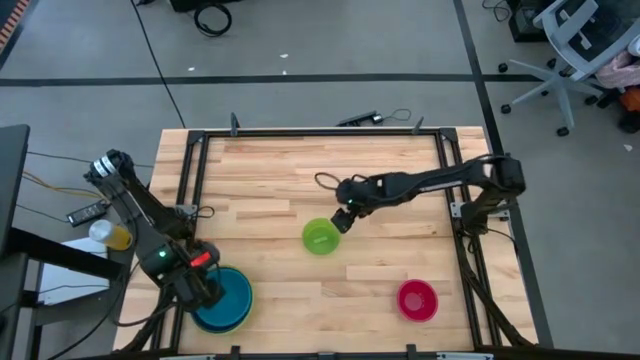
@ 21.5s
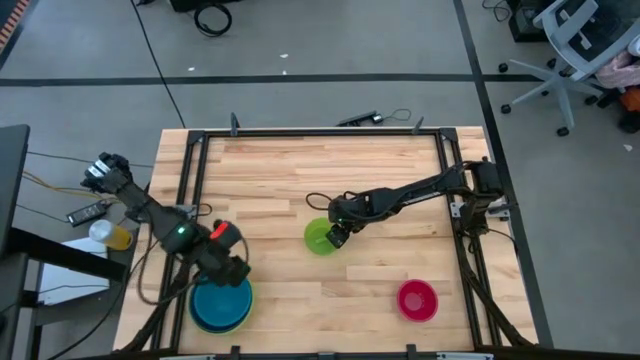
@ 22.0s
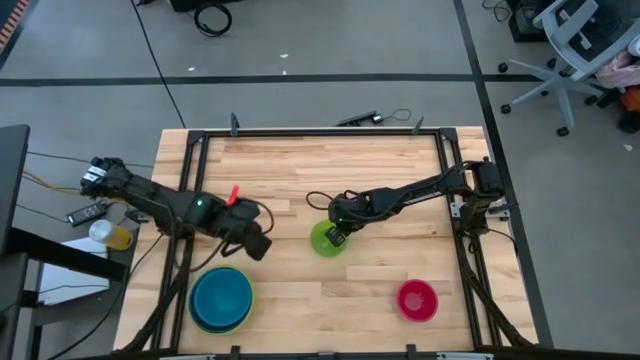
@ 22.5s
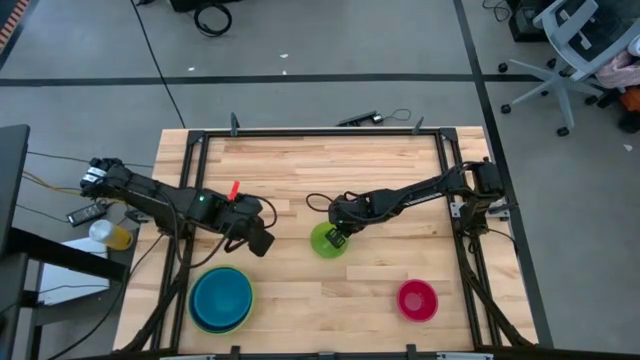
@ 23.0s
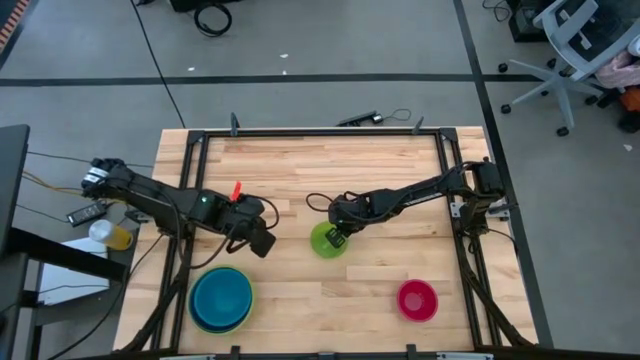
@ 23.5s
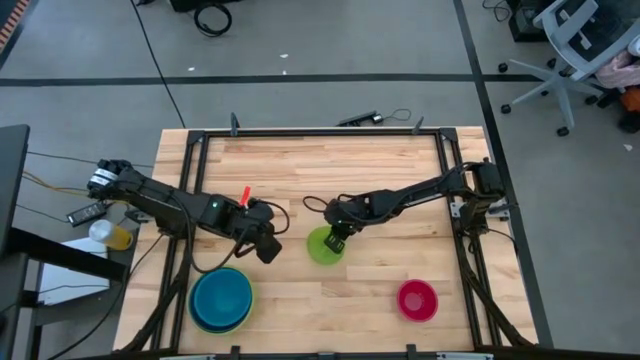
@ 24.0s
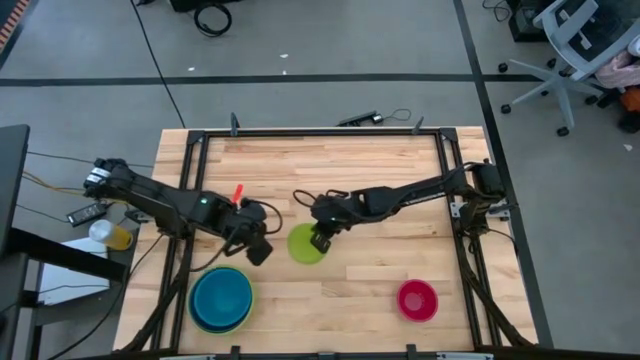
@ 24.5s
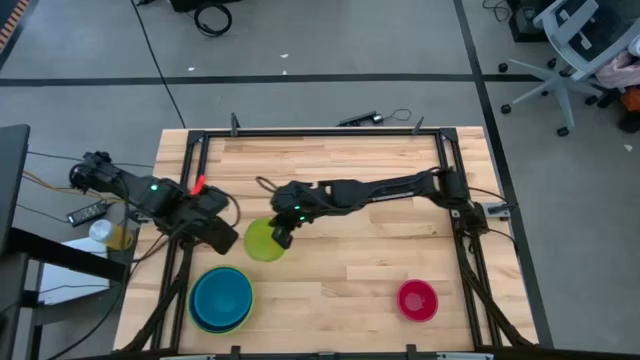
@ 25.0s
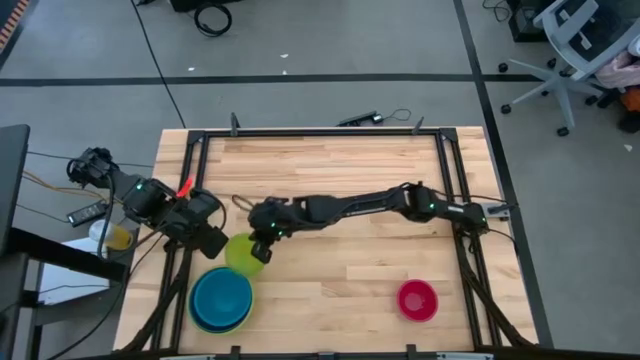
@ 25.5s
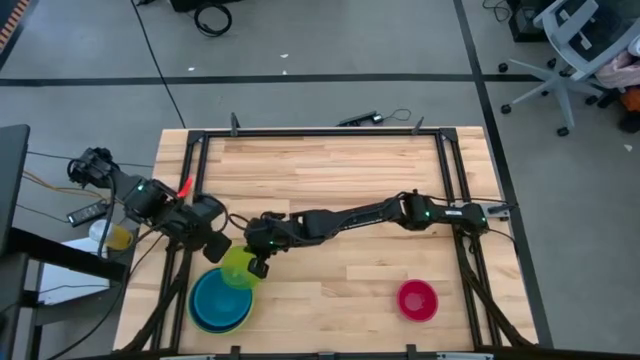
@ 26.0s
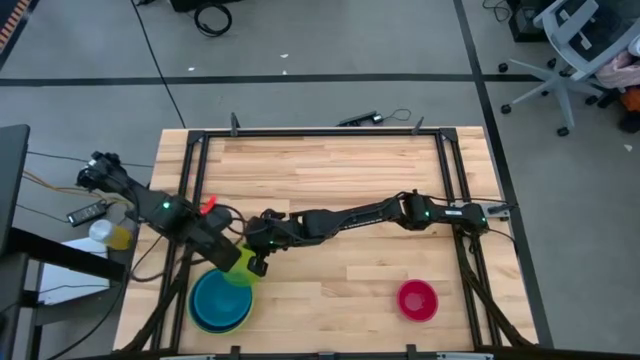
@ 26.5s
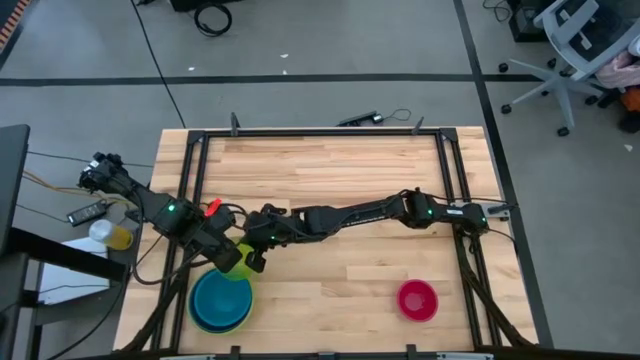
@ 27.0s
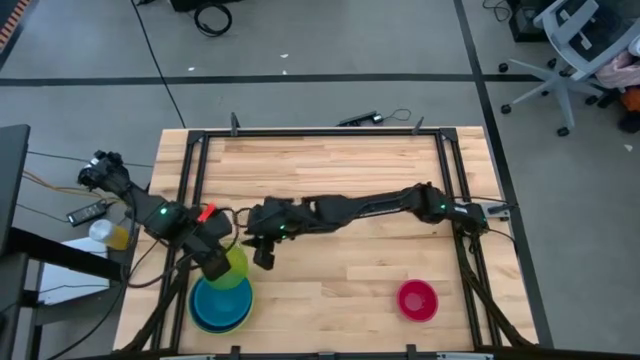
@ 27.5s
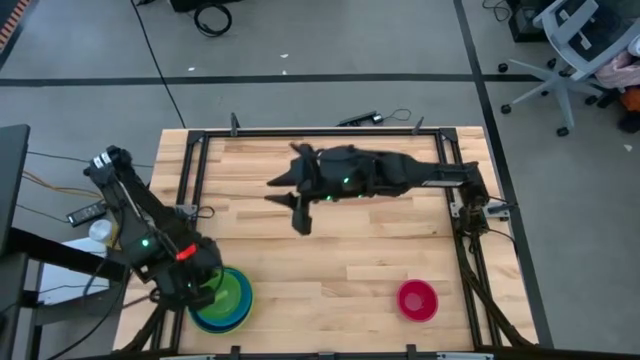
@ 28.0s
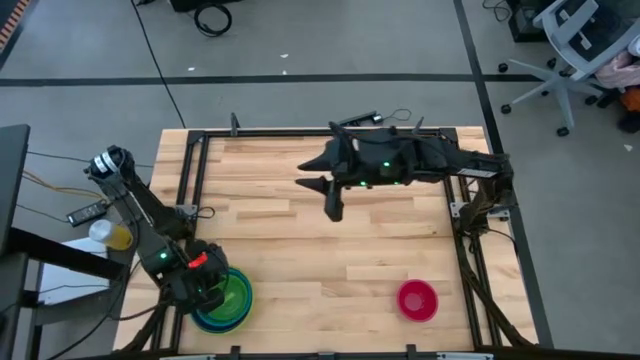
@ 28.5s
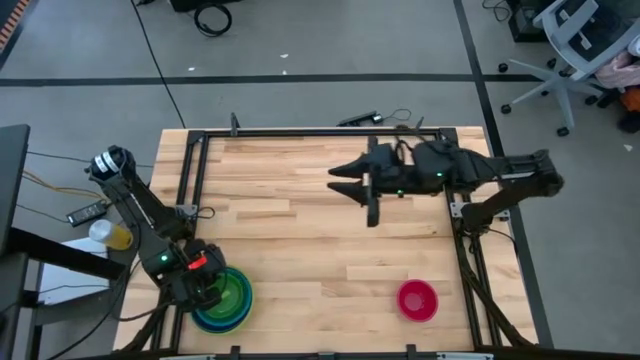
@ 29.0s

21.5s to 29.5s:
Stack the light green bowl on top of the blue bowl

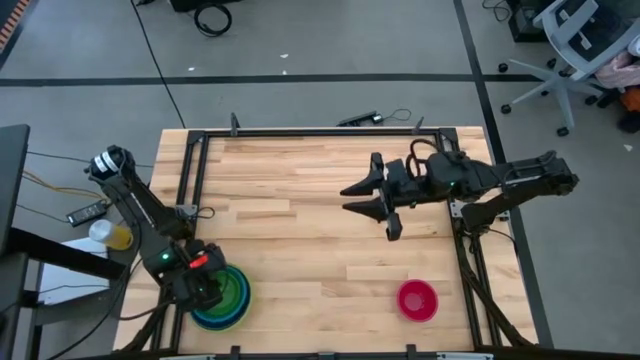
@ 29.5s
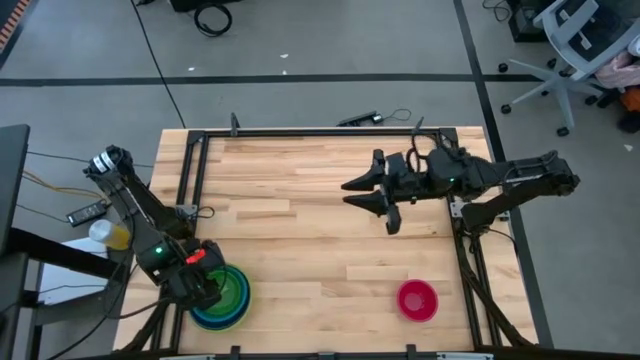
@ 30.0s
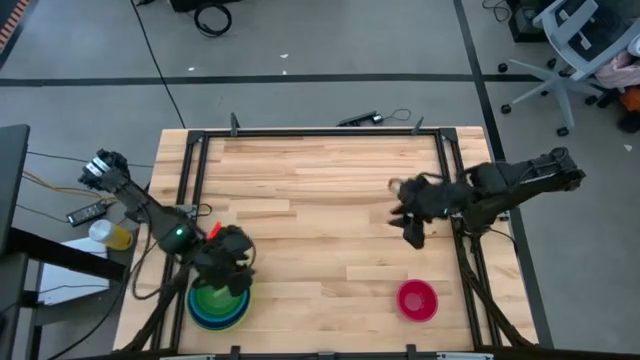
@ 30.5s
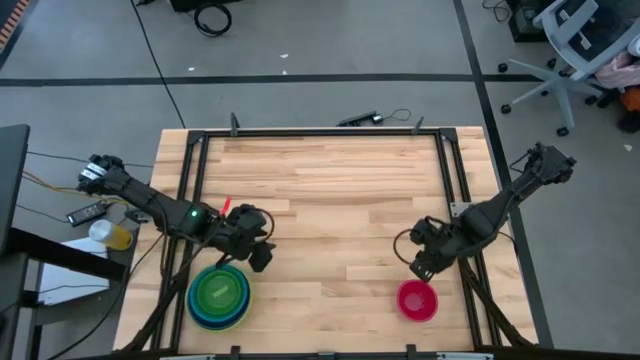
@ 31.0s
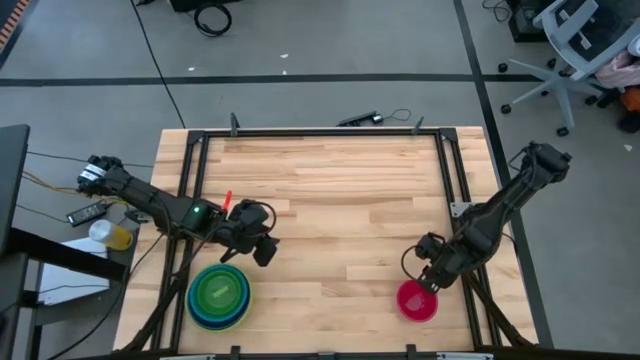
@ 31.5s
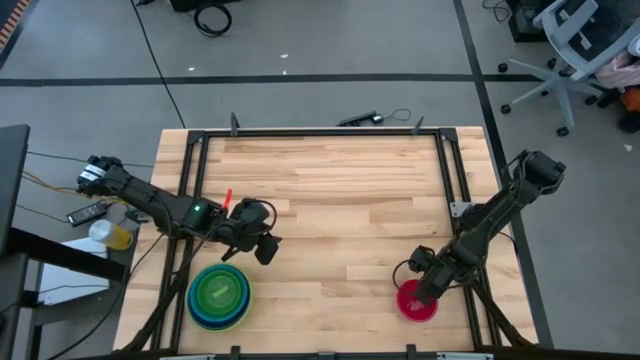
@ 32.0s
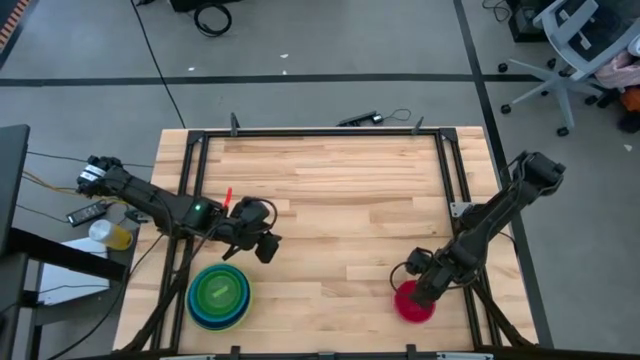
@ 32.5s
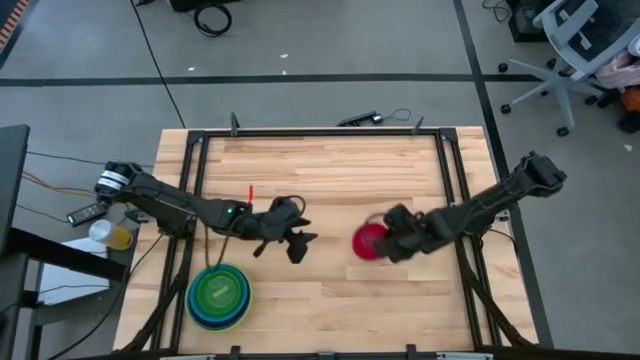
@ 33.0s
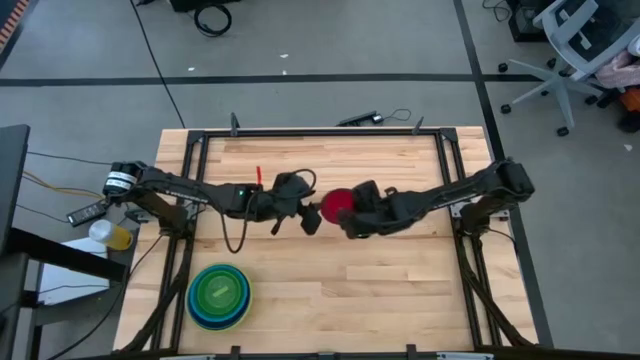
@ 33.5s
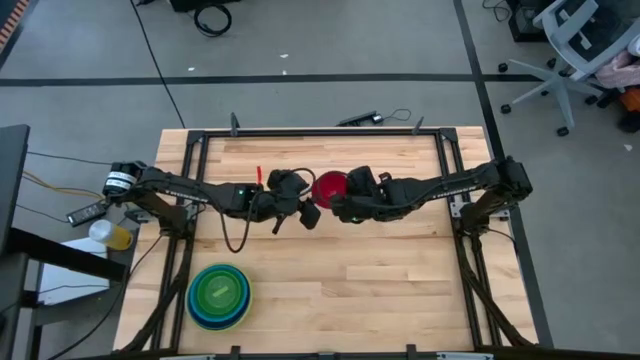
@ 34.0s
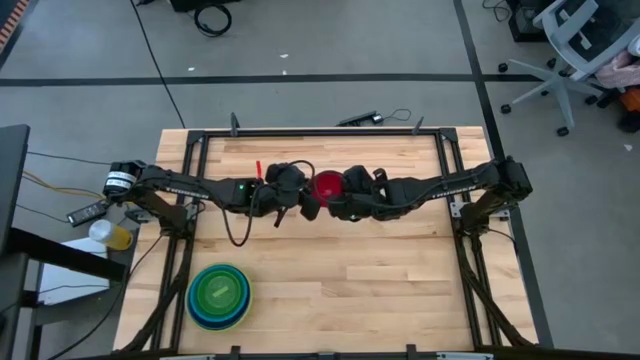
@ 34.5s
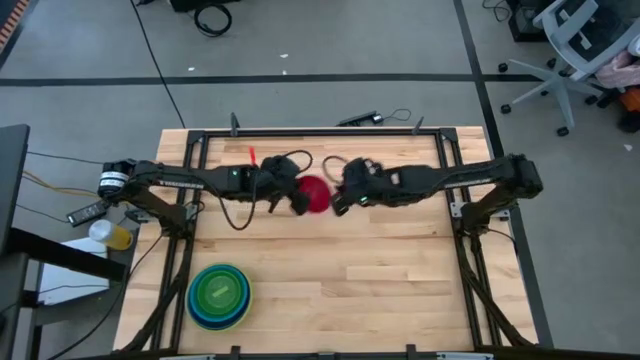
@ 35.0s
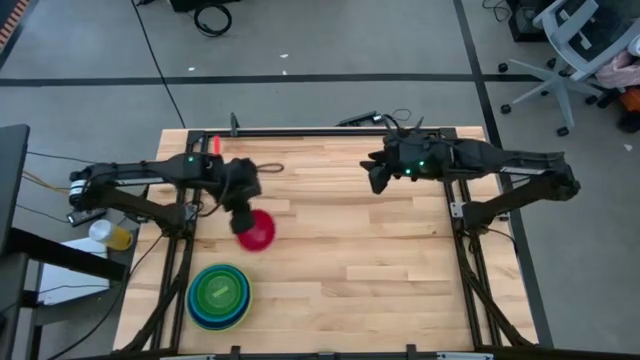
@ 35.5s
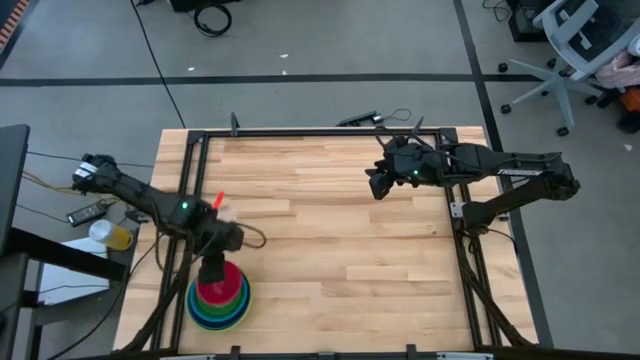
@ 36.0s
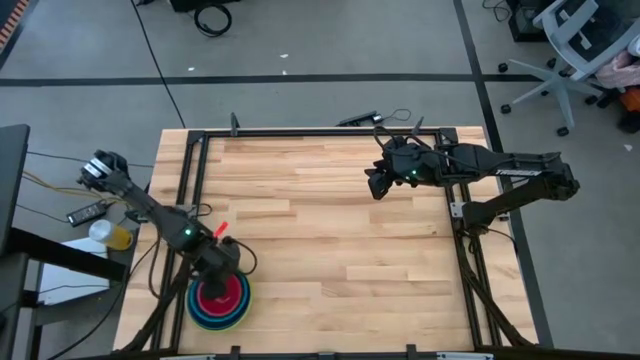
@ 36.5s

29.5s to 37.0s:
Stack the red bowl on top of the light green bowl
